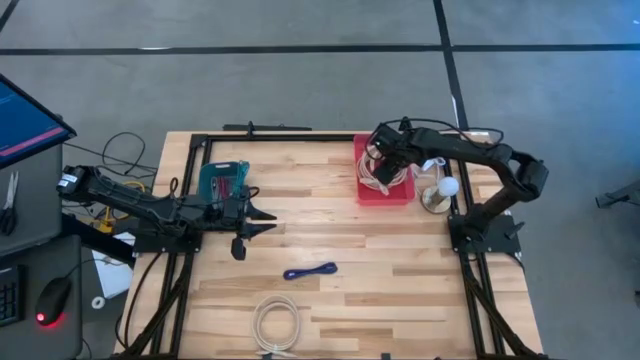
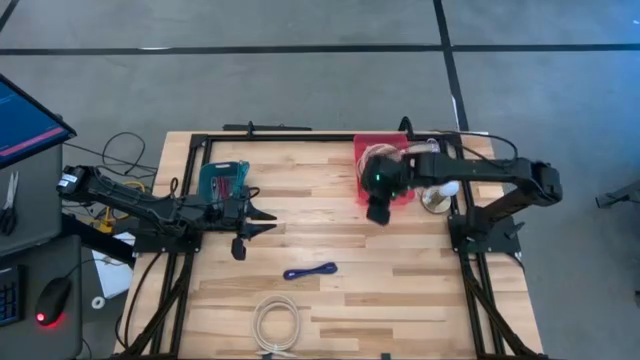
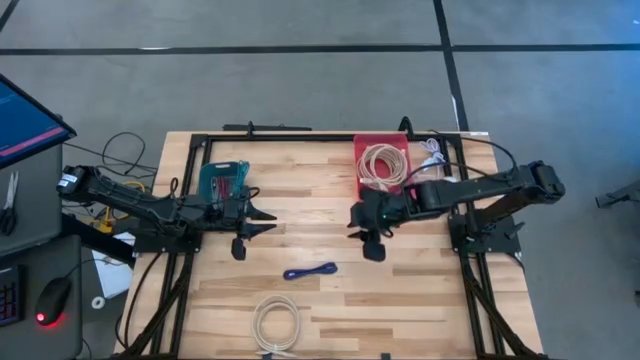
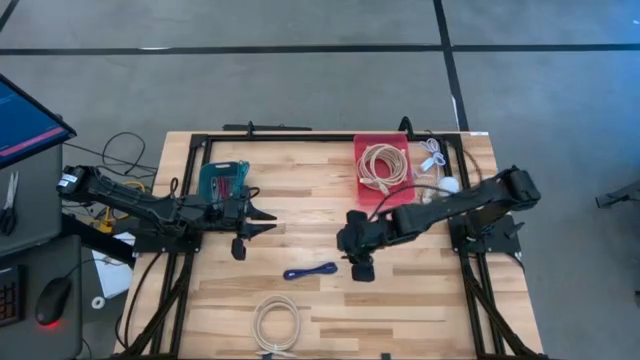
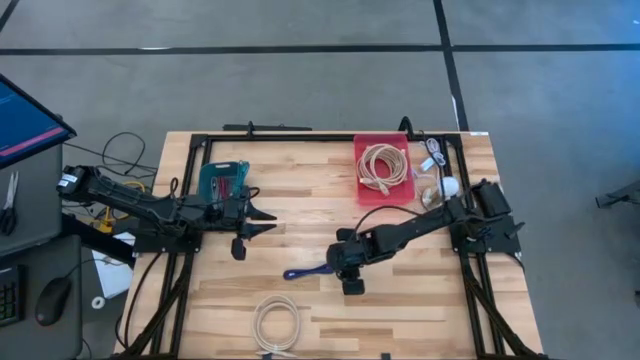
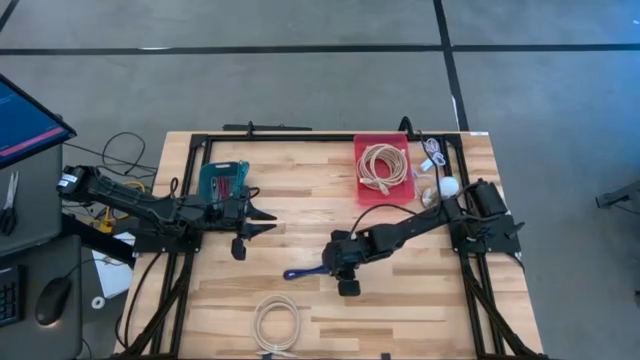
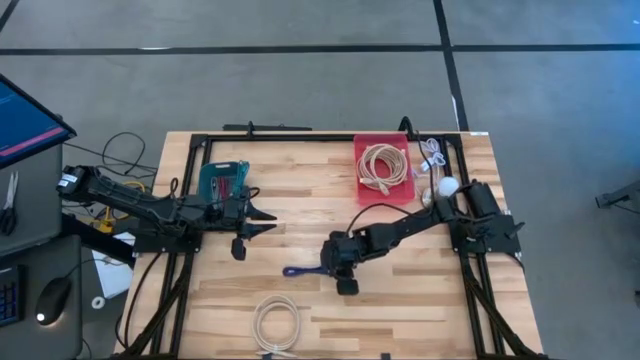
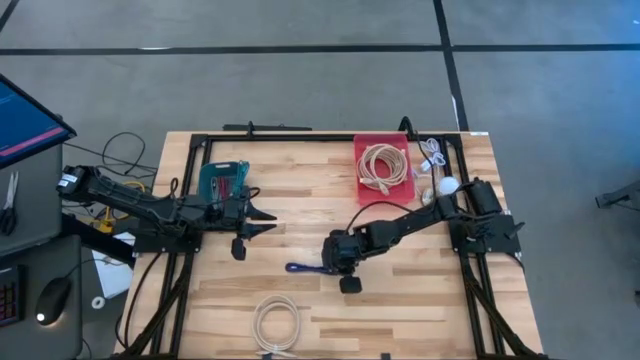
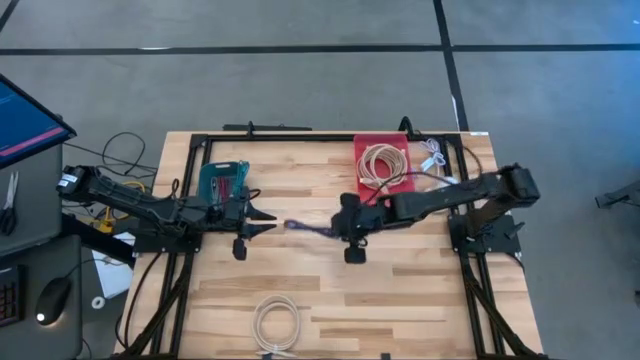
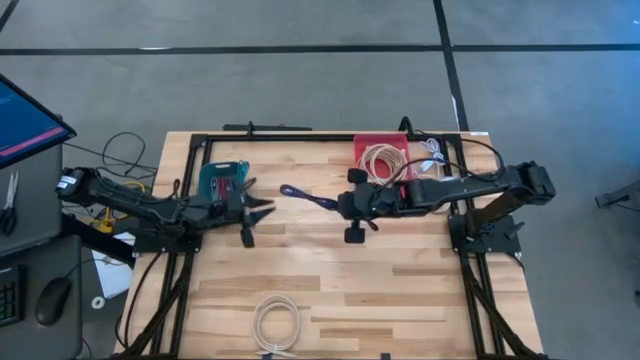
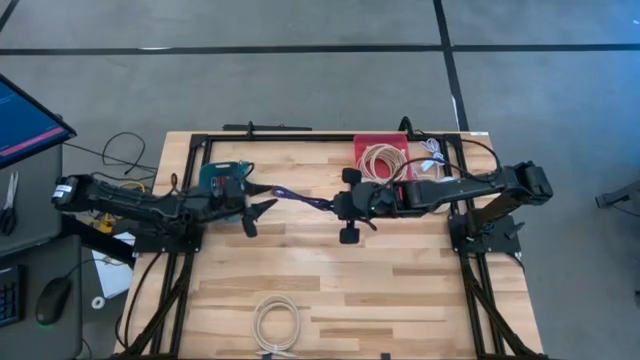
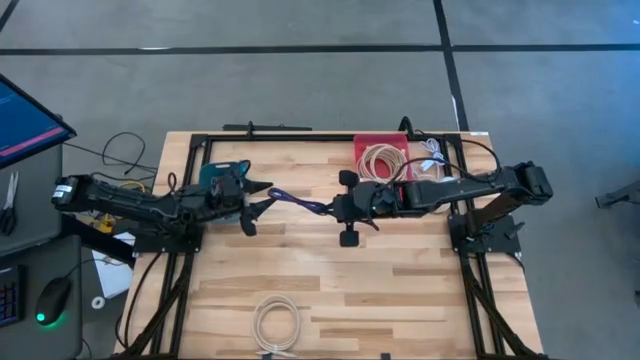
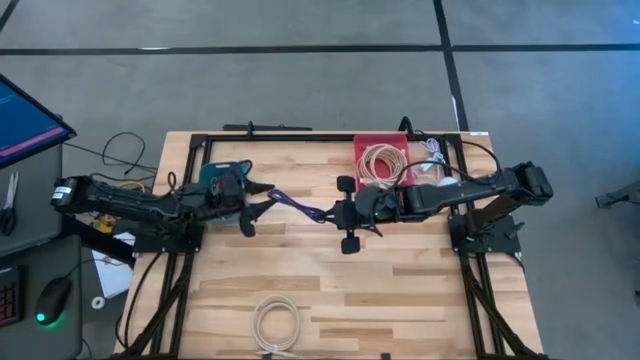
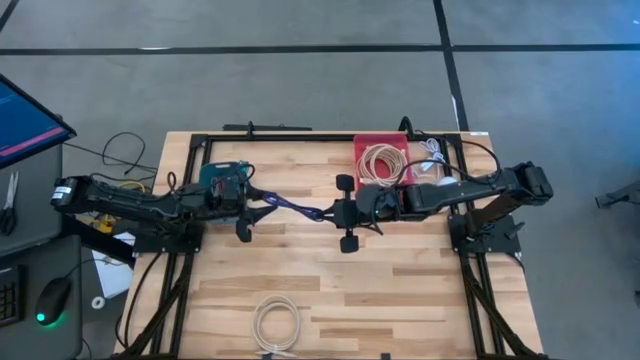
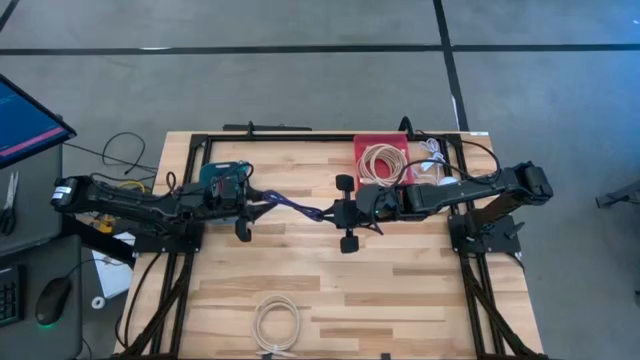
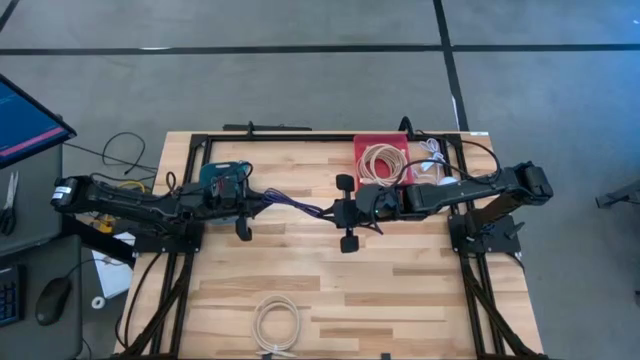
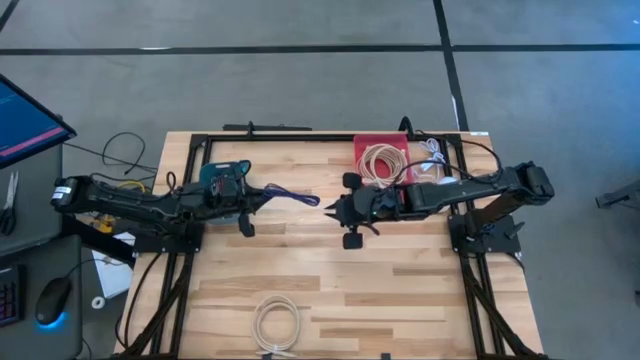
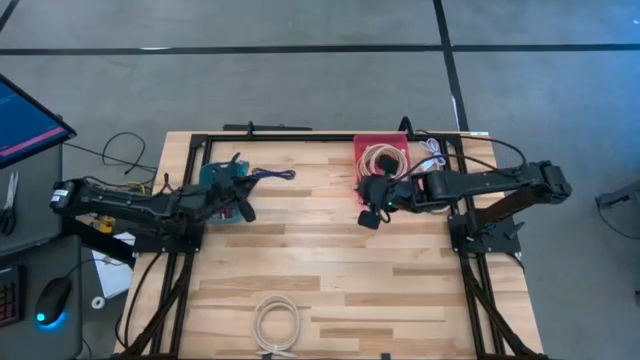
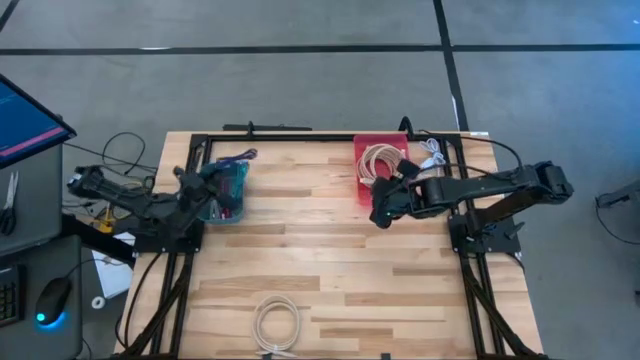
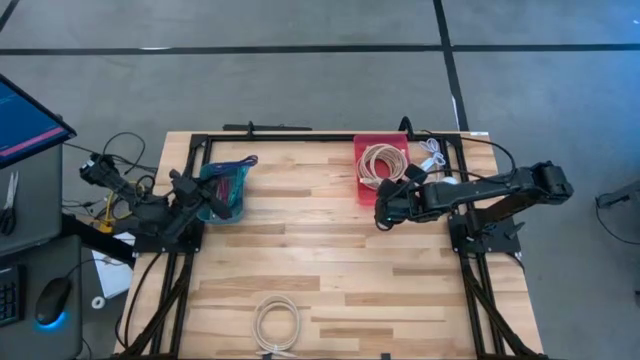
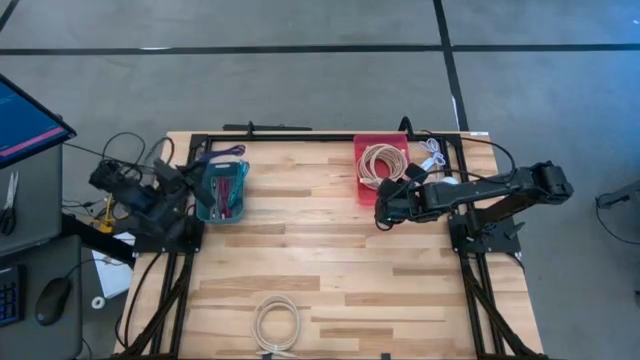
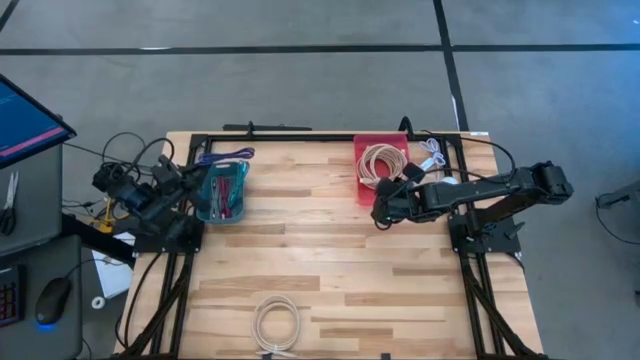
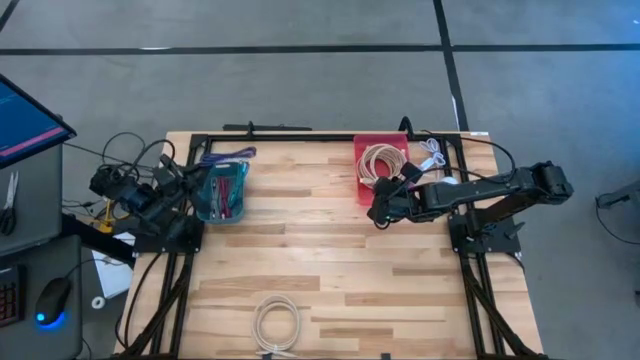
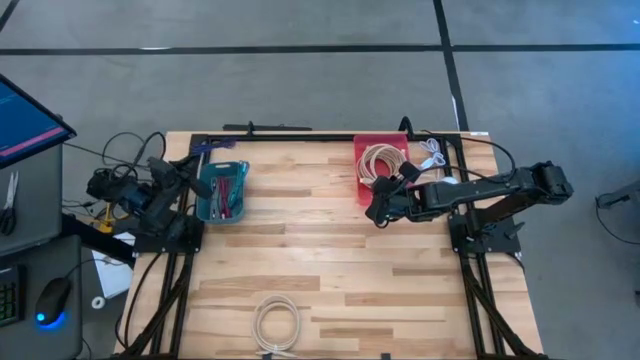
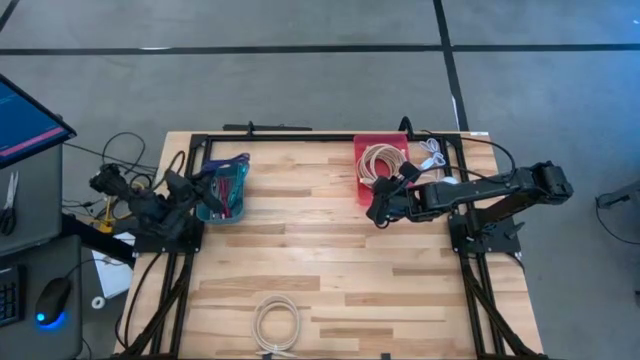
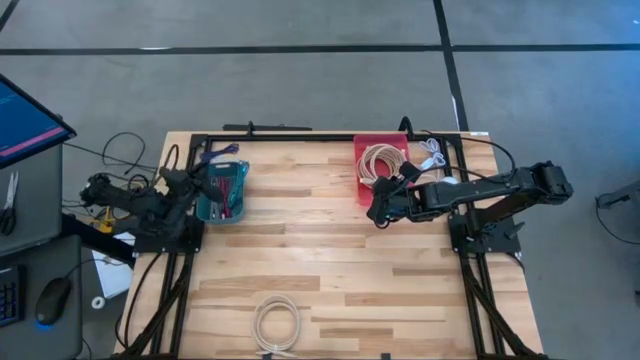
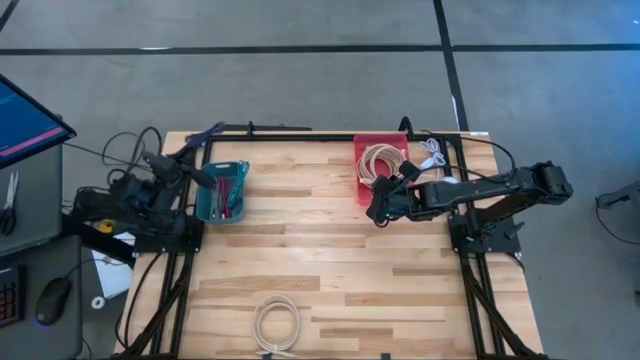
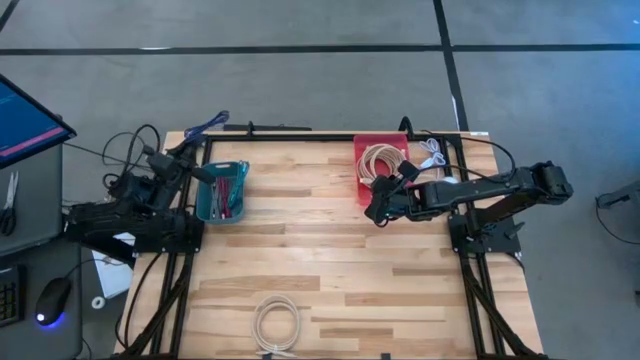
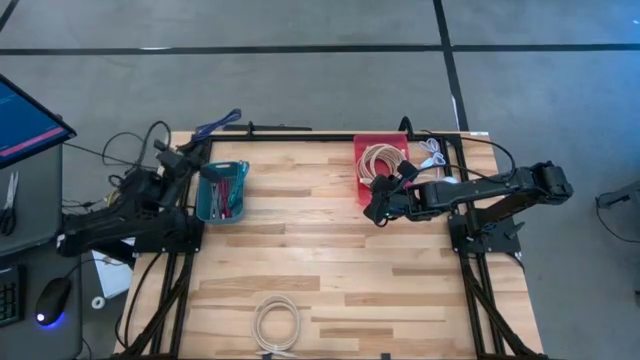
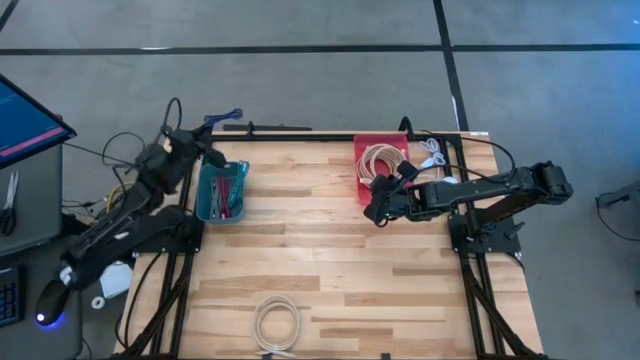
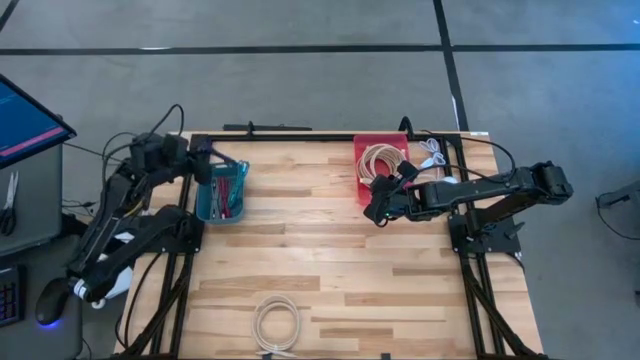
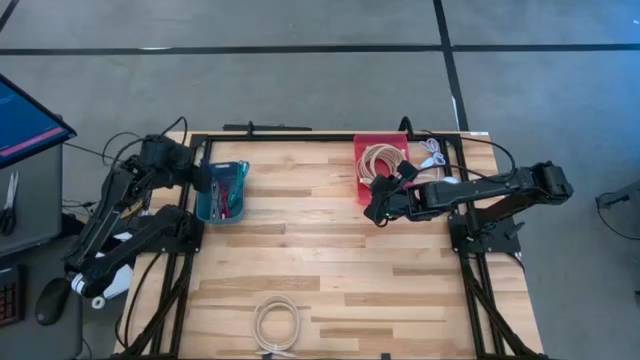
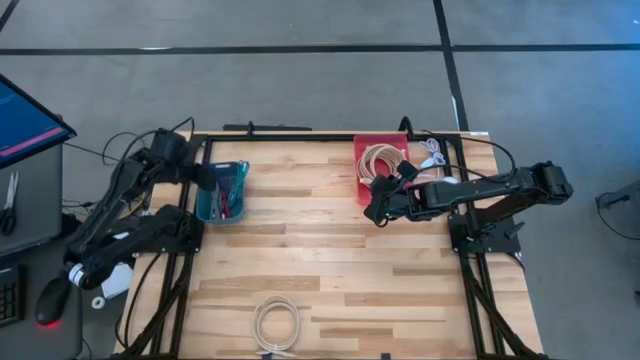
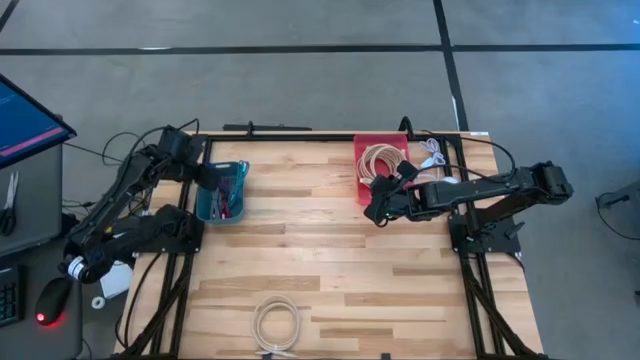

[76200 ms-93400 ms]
Task: Pick & Place USB Port
Put the violet charger cable in the blue bin
